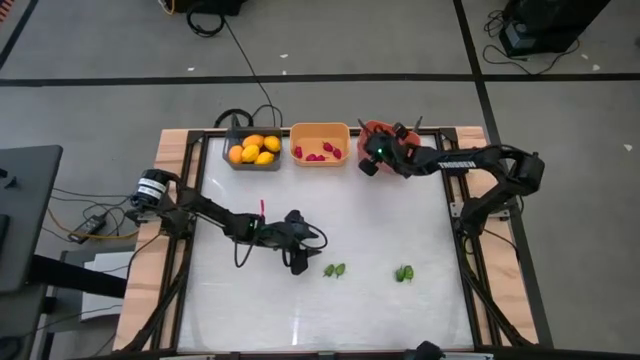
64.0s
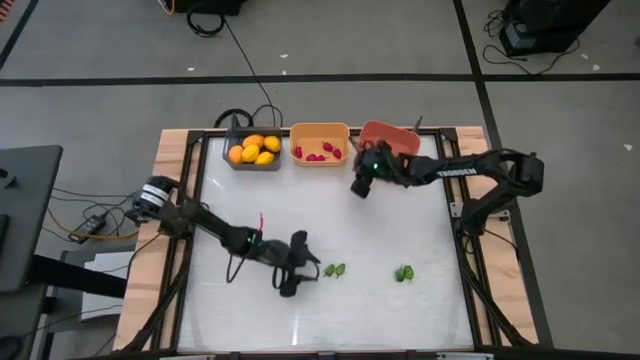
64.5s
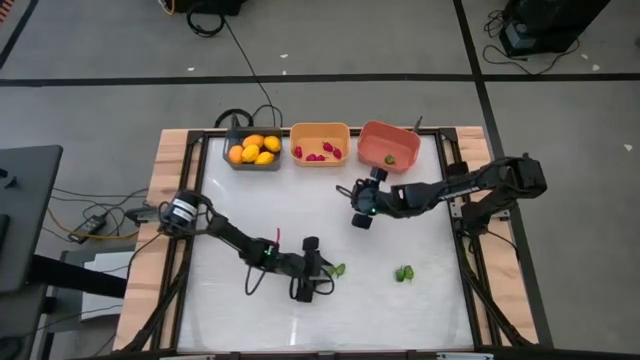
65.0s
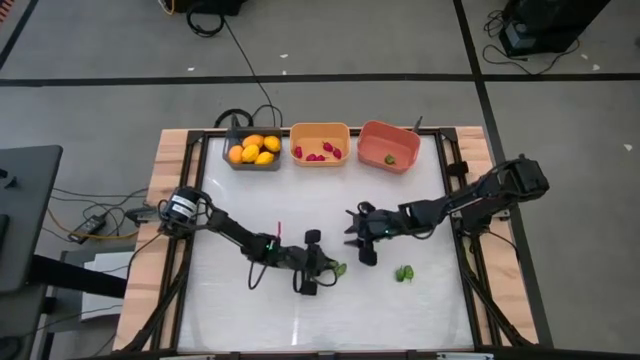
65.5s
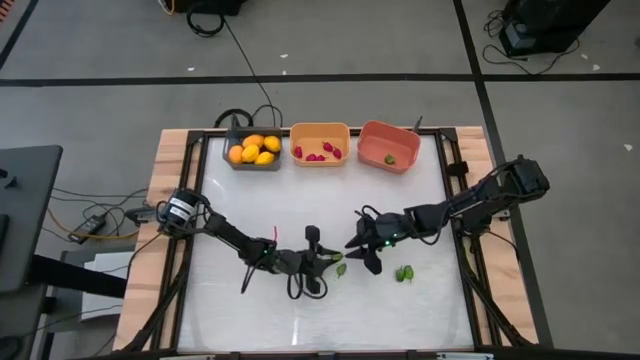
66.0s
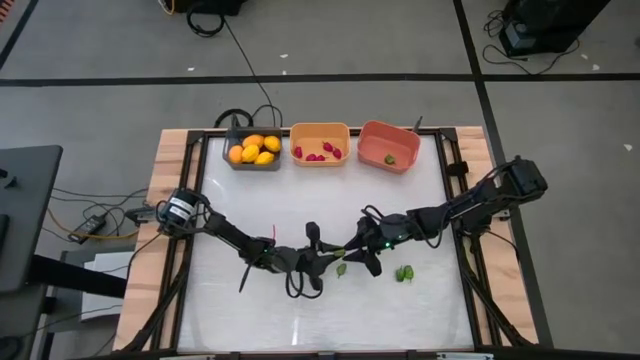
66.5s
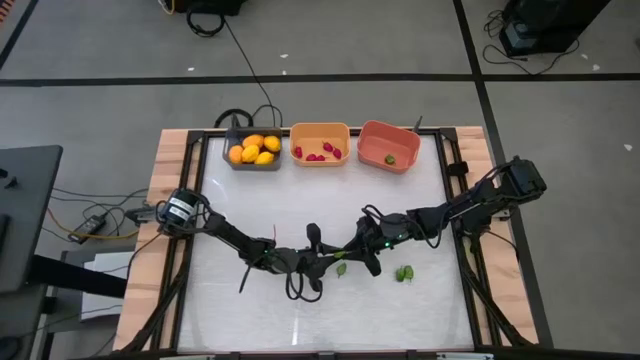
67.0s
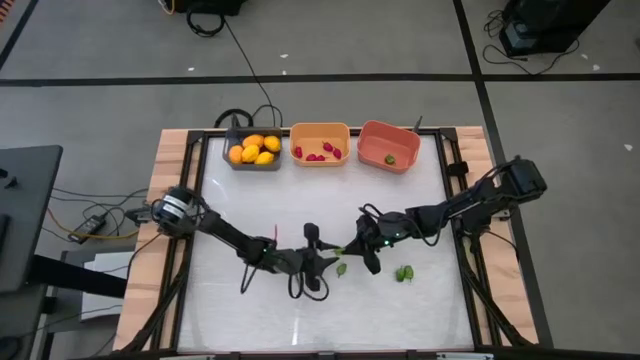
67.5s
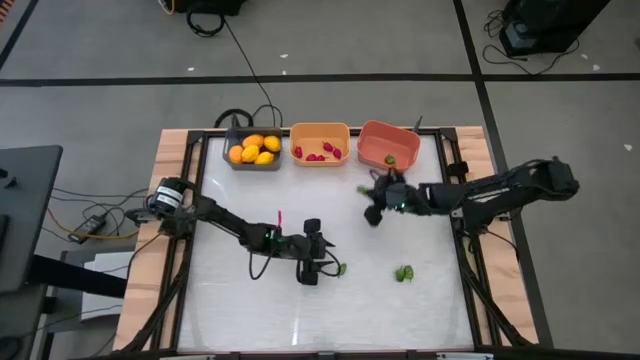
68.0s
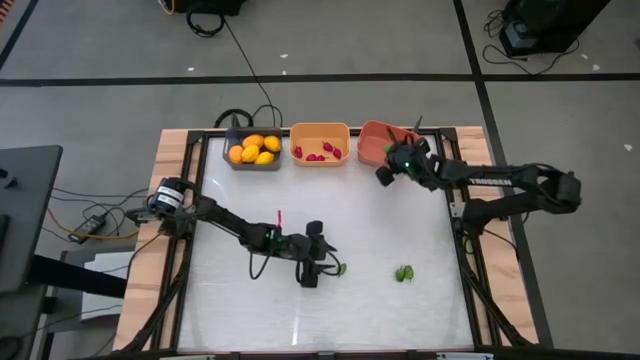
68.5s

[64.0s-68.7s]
Task: Sort produce into baskets
Put the green chili pepper into the orange bin

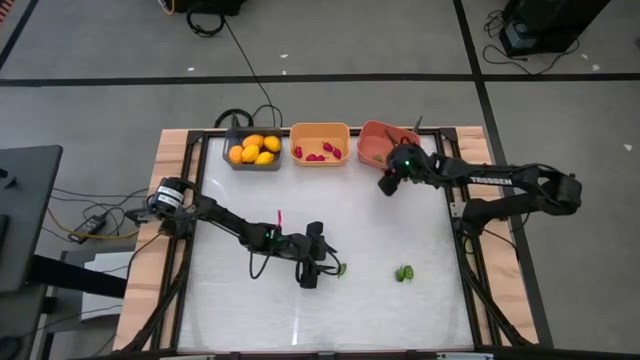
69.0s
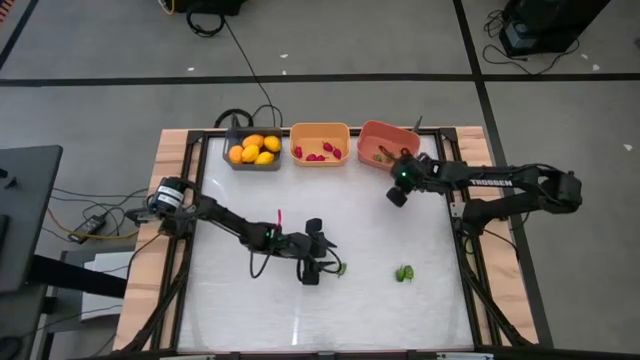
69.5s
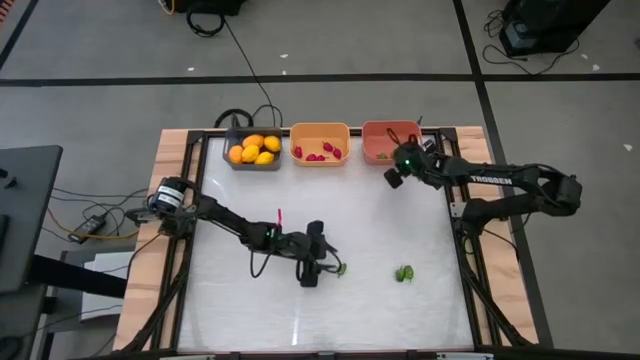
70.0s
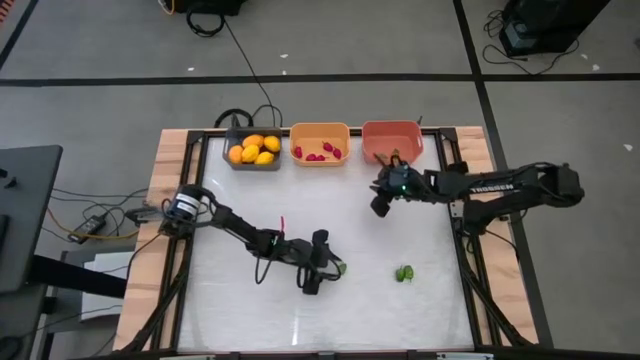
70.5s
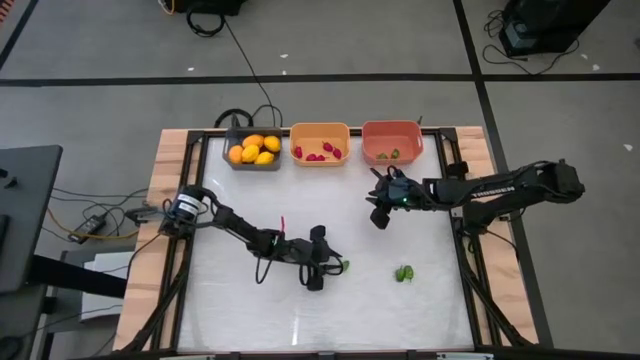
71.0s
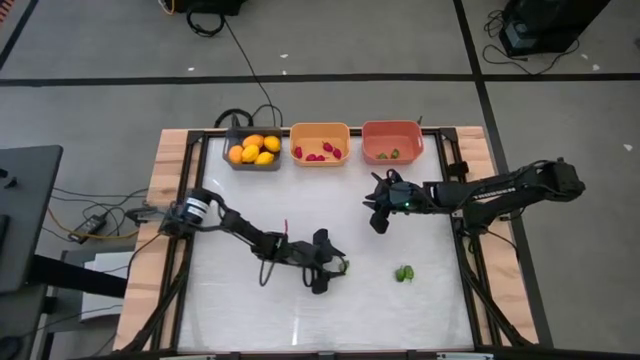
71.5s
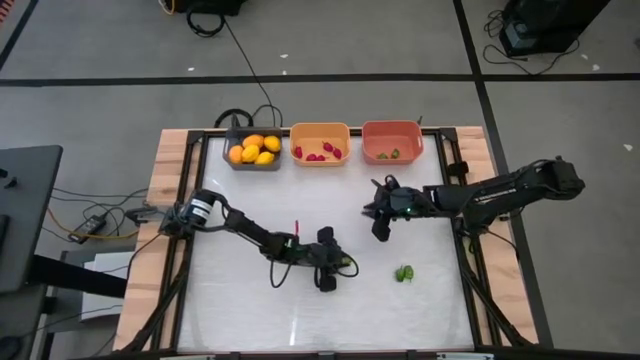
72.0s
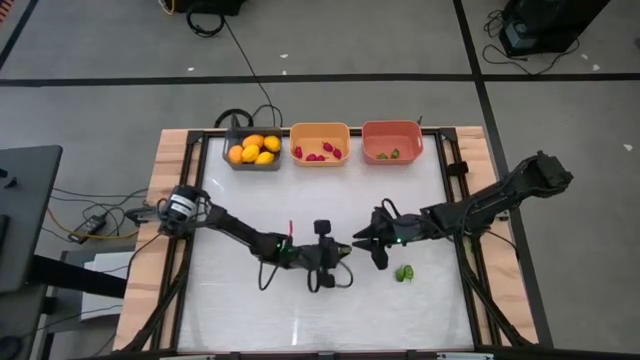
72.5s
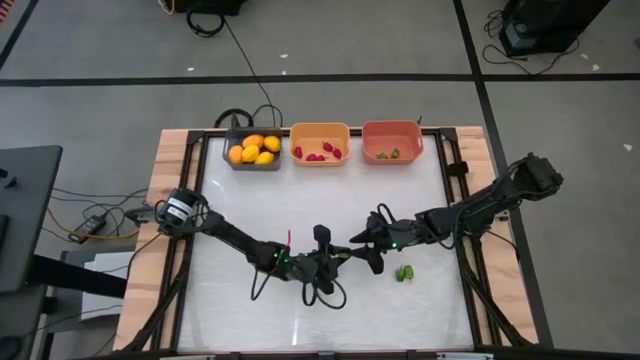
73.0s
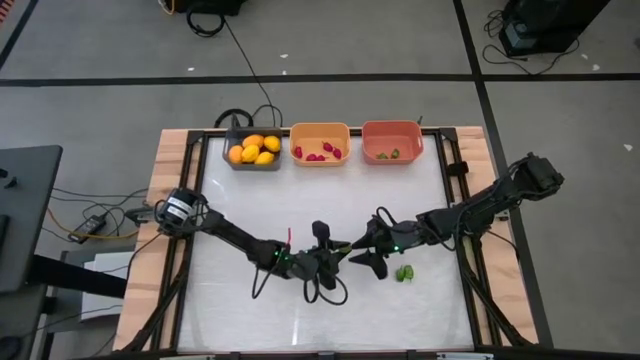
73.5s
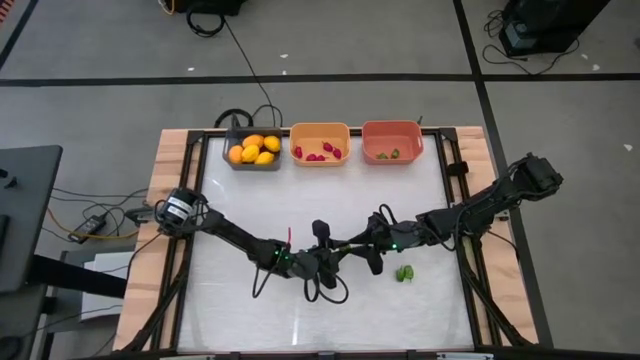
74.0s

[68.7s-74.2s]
Put the green chili pepper into the orange bin

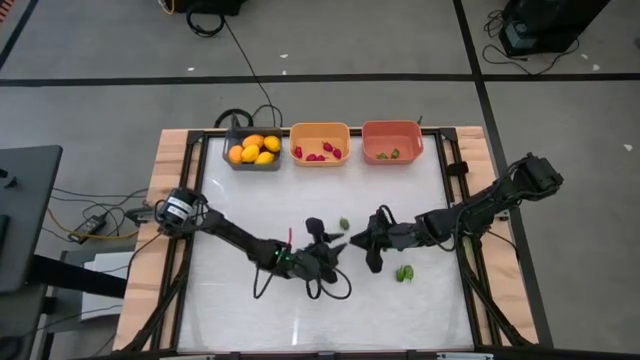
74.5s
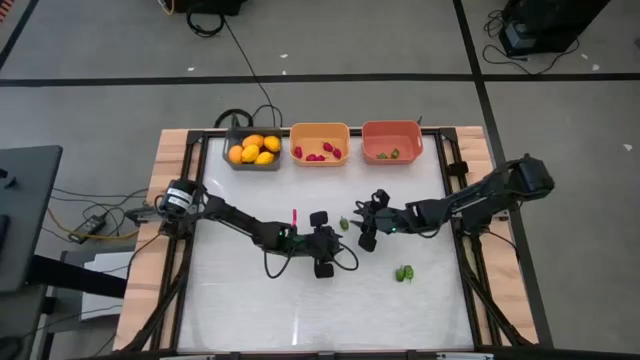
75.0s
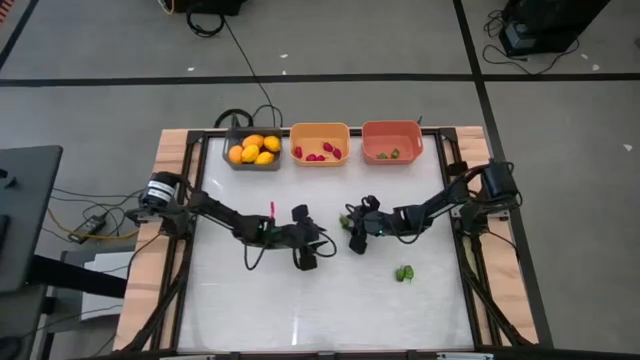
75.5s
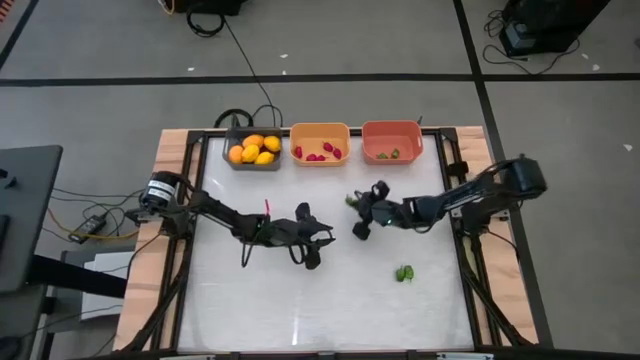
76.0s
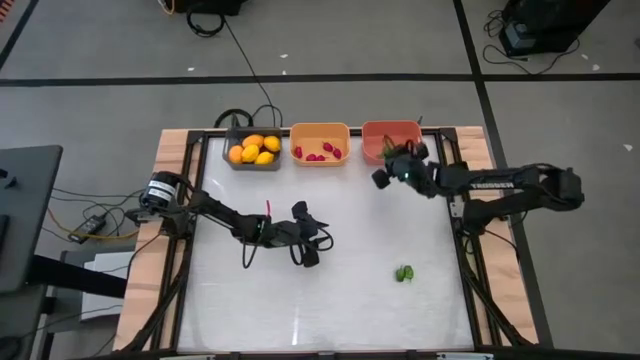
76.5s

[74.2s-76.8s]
Put the green chili pepper into the orange bin

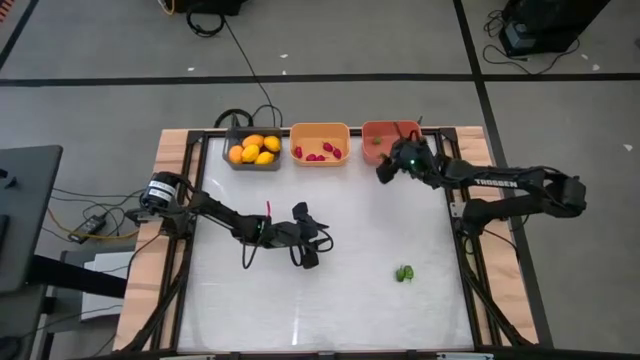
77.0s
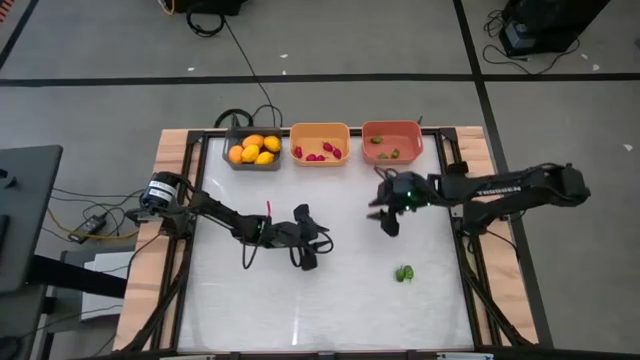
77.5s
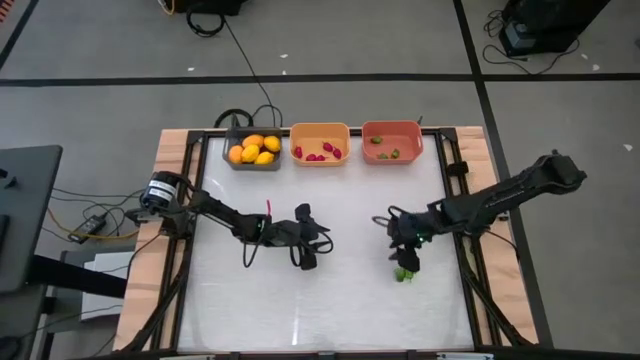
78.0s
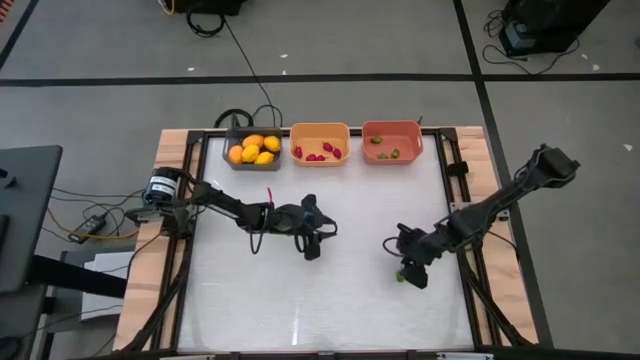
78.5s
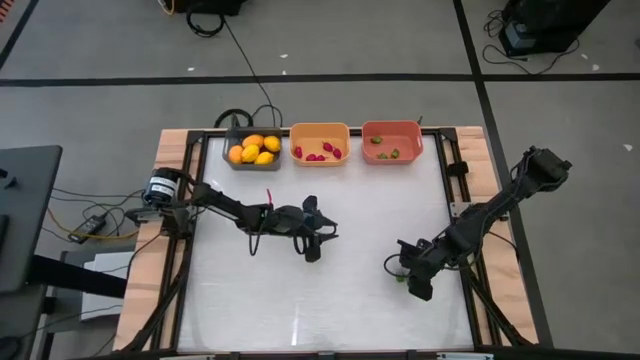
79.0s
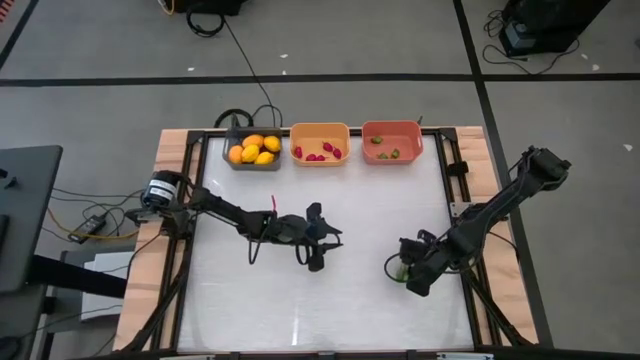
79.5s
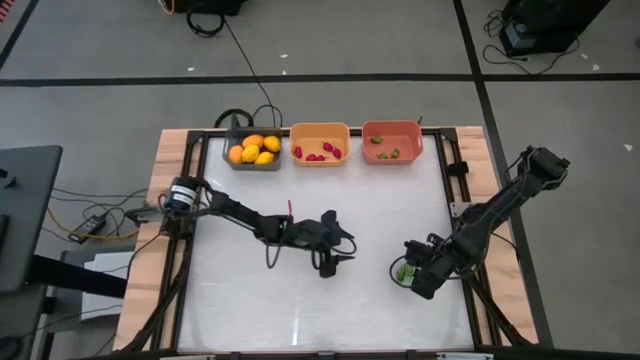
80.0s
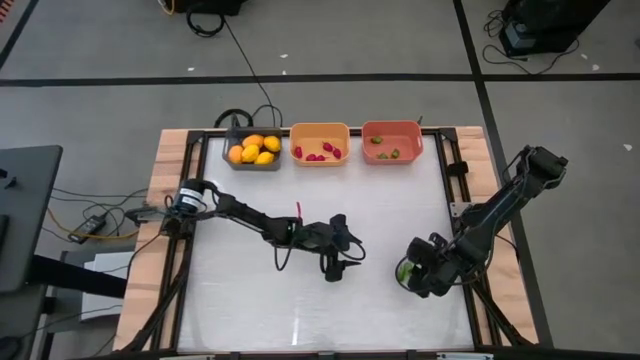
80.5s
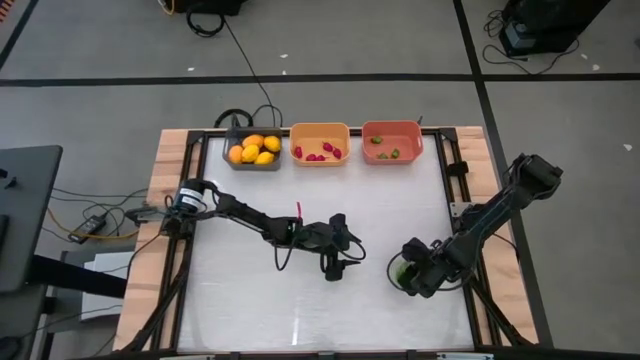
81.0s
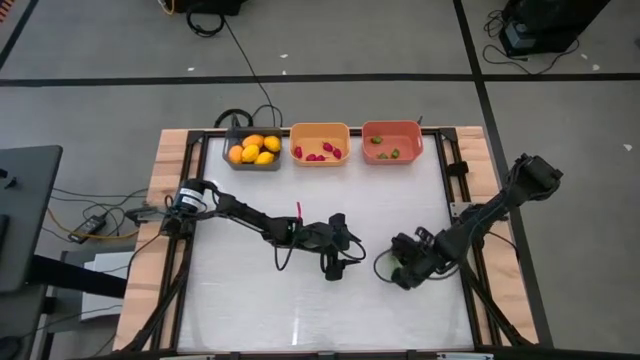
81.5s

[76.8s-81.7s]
Put the green chili pepper into the orange bin

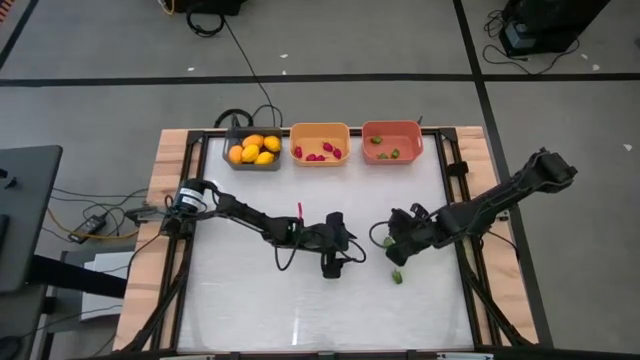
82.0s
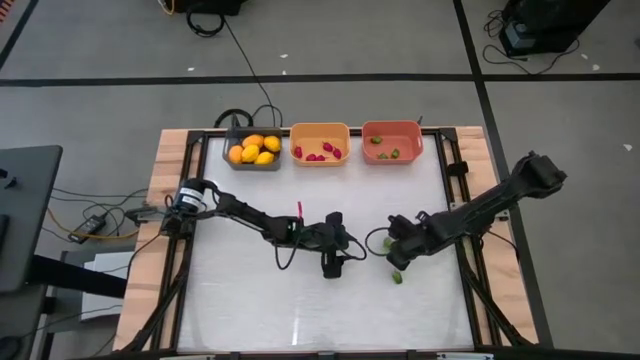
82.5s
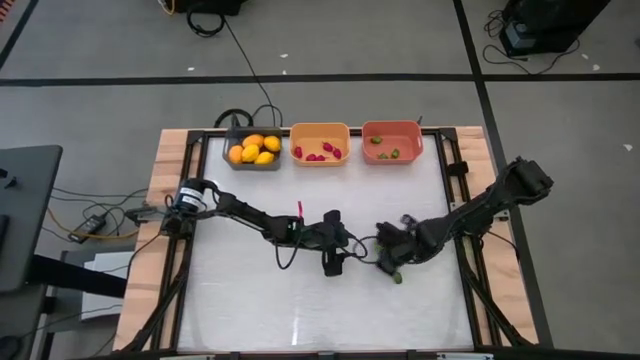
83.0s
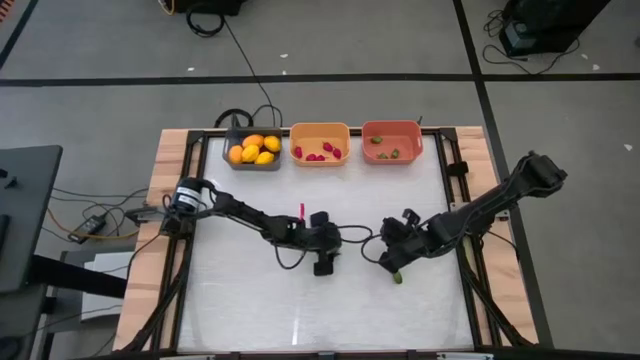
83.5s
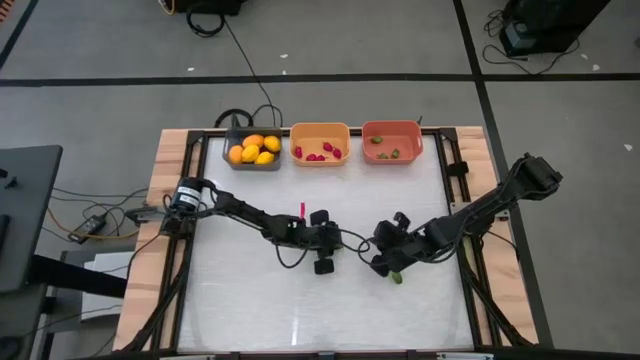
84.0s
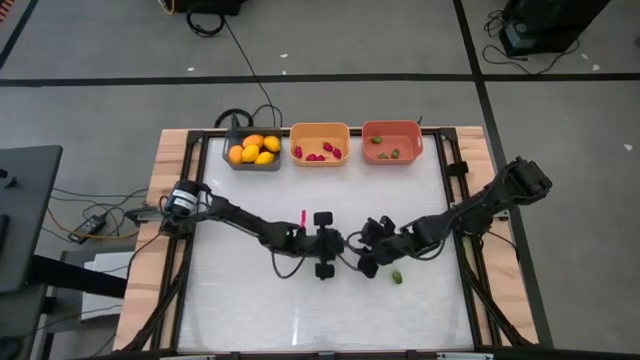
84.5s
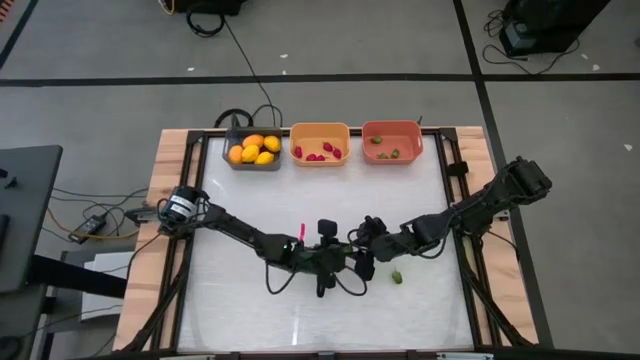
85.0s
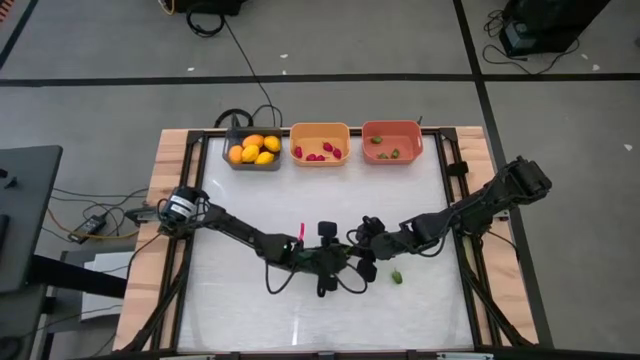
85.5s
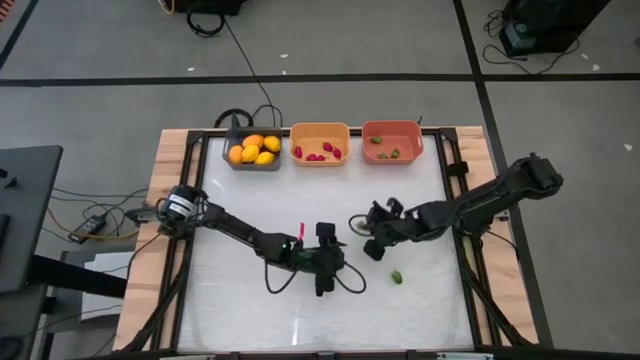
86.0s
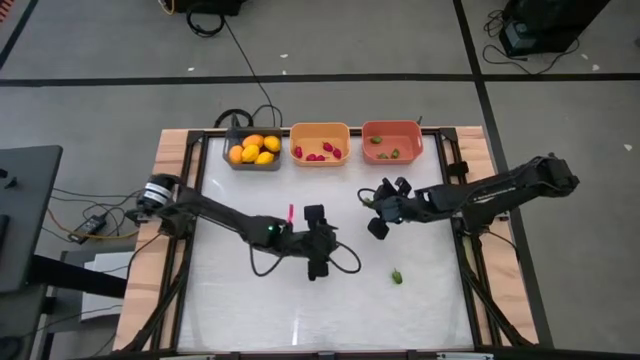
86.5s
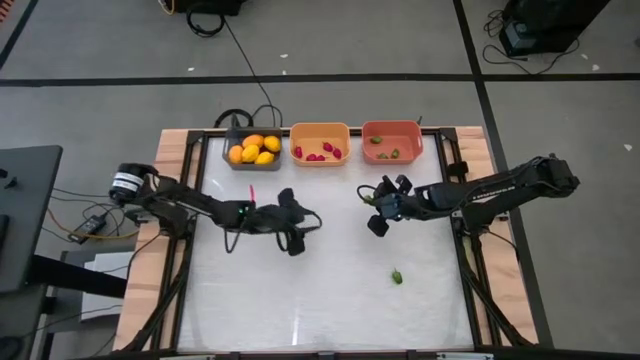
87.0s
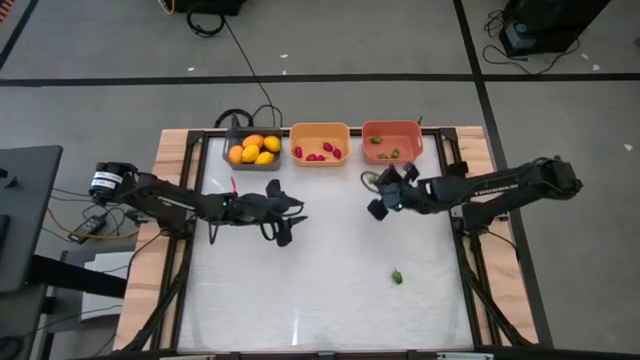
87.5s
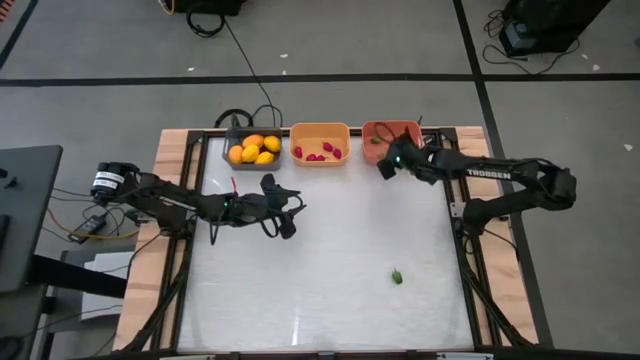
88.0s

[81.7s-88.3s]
Put the green chili pepper into the orange bin
